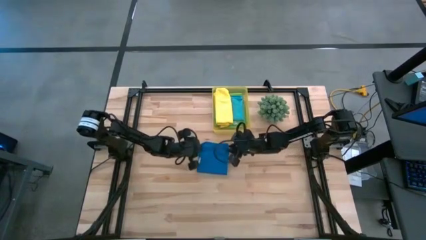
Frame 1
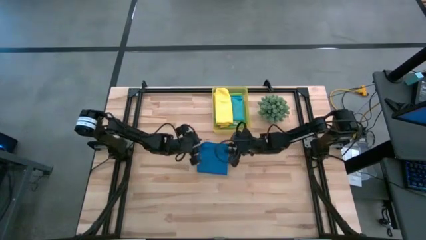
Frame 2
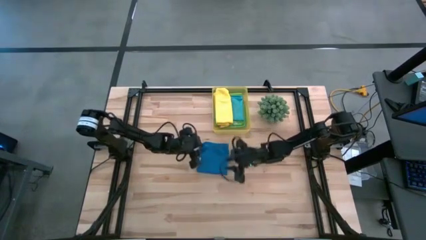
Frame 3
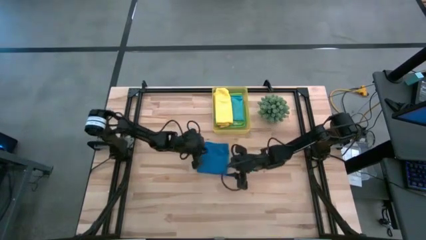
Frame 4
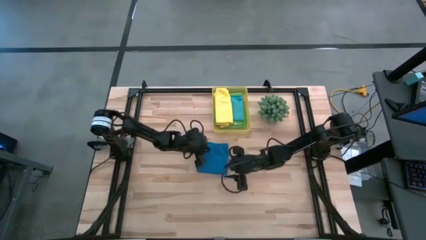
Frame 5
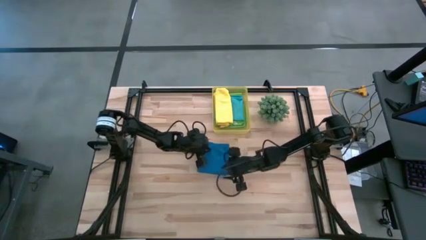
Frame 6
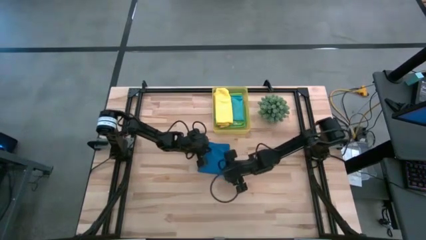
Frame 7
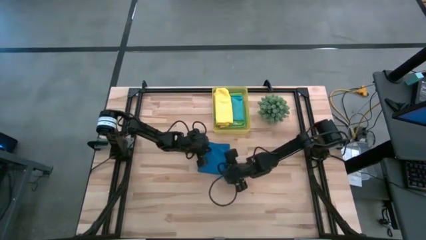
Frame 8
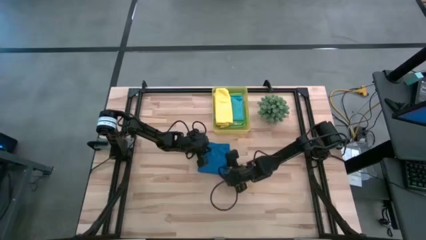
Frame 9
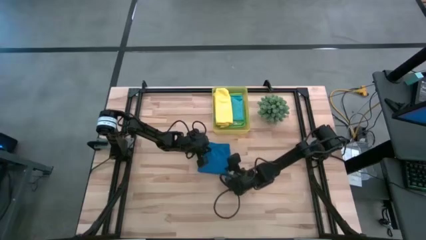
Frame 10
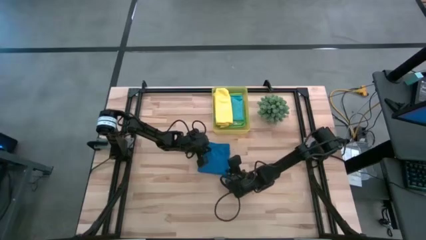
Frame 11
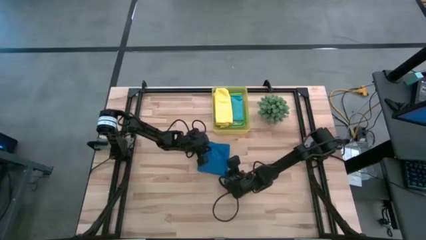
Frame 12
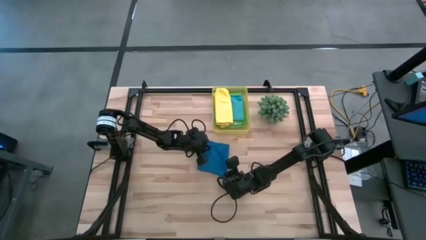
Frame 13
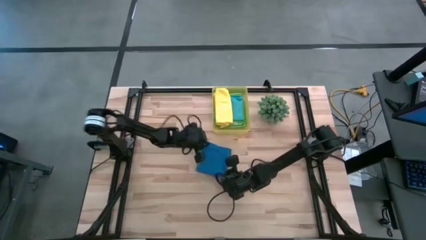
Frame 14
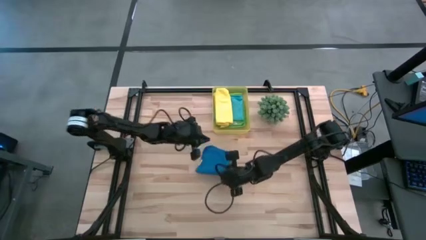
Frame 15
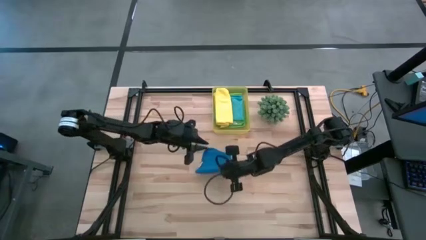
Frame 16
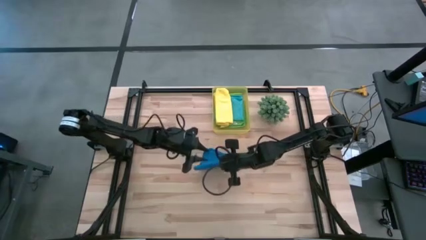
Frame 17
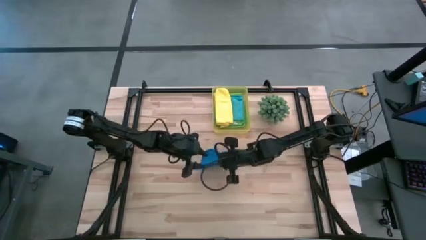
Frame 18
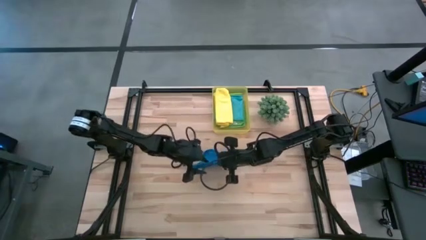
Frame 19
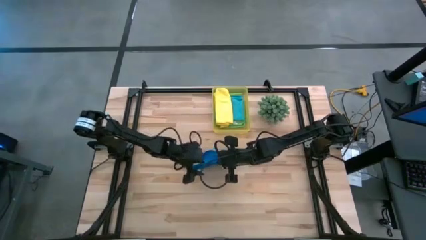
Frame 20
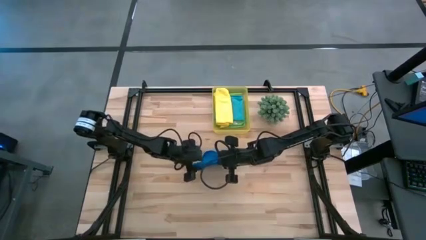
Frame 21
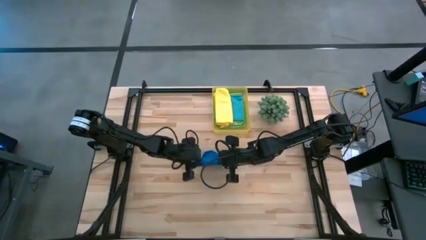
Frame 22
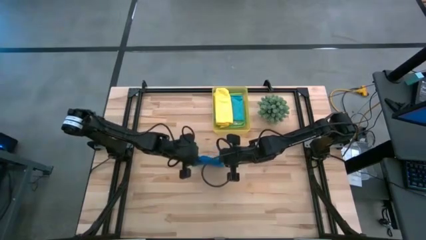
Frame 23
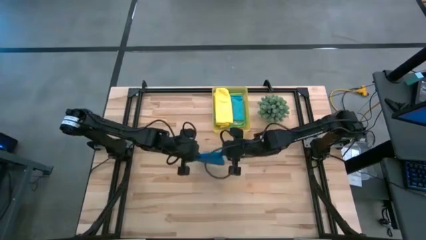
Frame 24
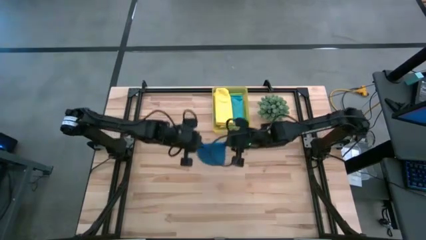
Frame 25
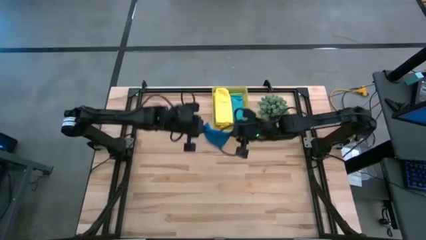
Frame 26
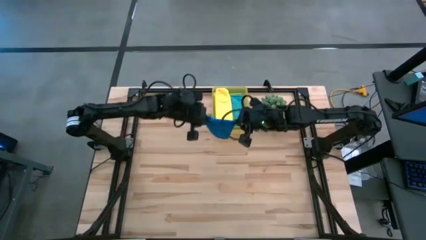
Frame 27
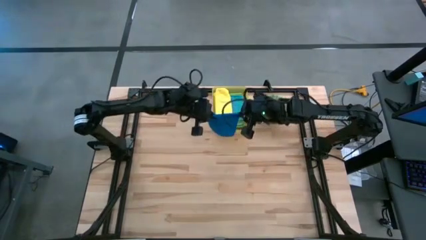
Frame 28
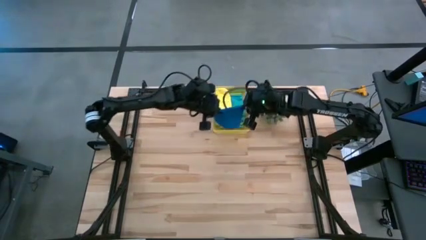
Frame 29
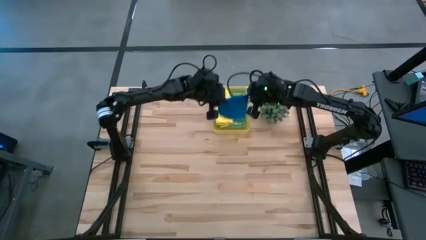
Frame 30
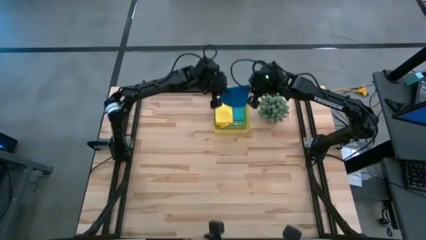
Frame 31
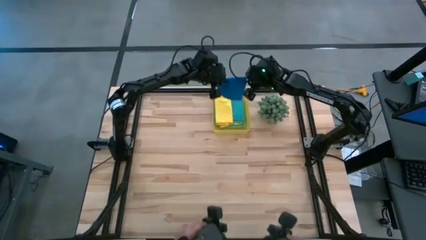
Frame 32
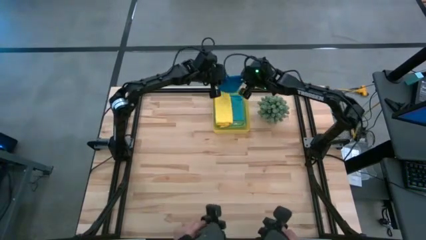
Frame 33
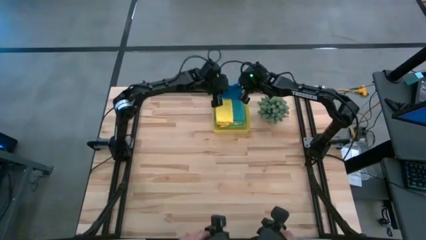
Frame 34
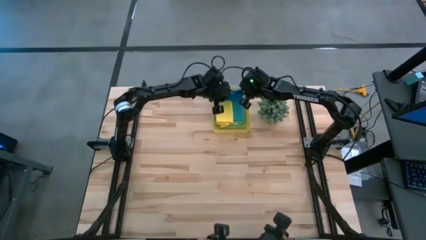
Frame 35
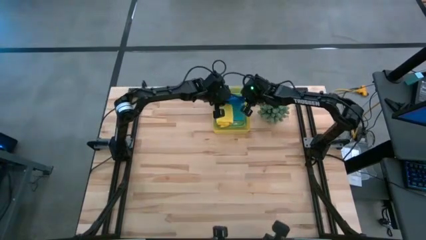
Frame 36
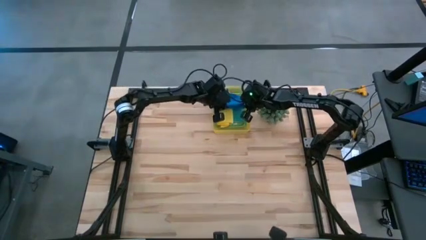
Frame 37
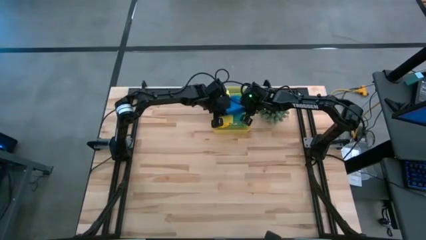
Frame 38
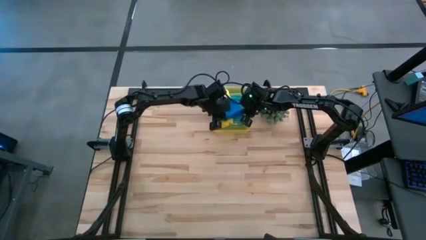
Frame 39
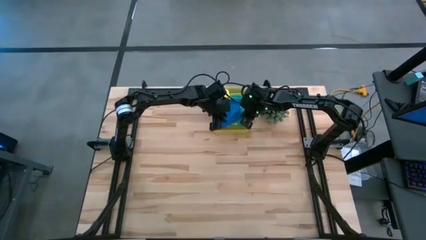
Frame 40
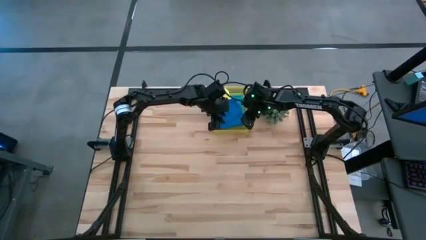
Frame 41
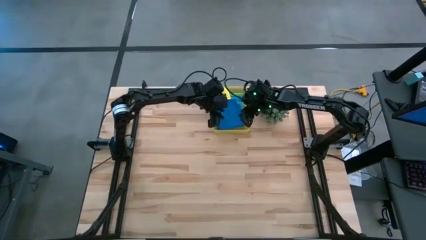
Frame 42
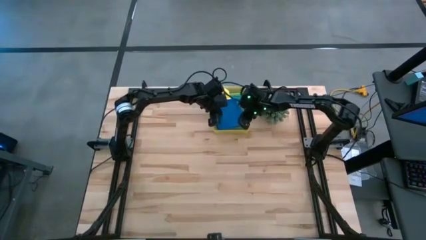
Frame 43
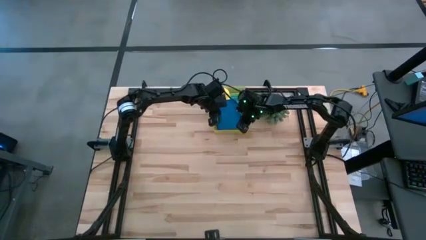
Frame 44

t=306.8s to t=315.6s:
Task: Fold microfiber towels
Put the blue microfiber cloth into the yellow bin

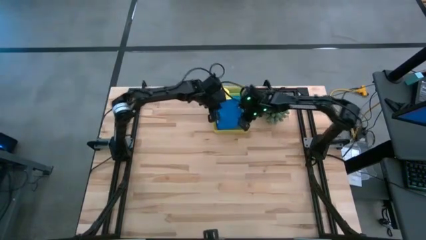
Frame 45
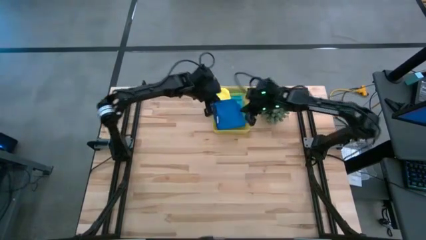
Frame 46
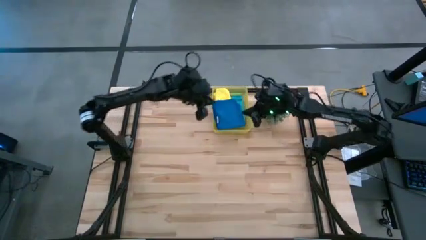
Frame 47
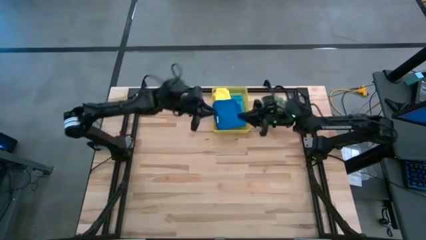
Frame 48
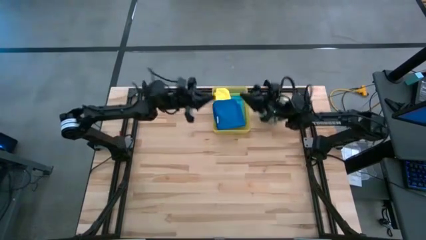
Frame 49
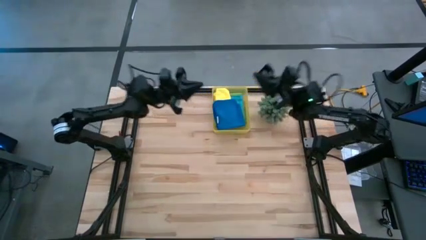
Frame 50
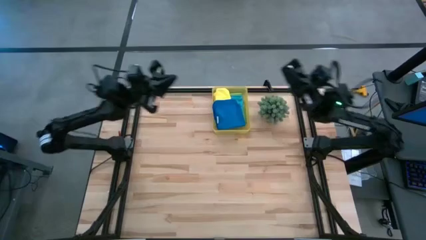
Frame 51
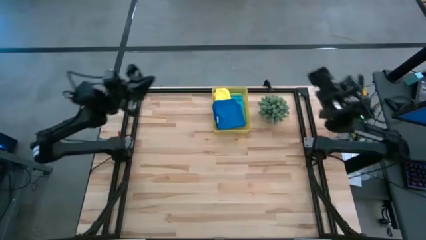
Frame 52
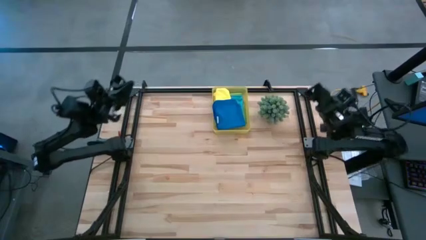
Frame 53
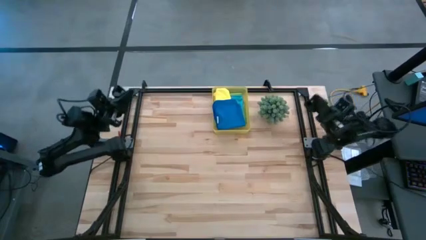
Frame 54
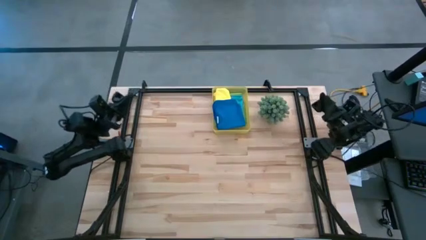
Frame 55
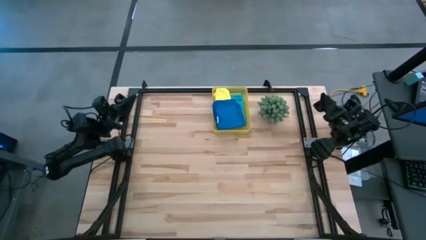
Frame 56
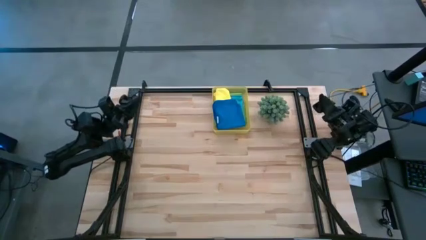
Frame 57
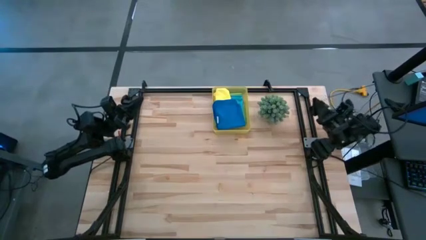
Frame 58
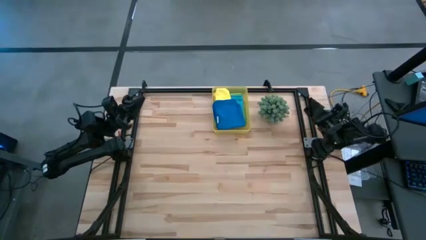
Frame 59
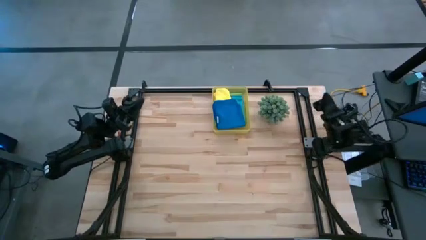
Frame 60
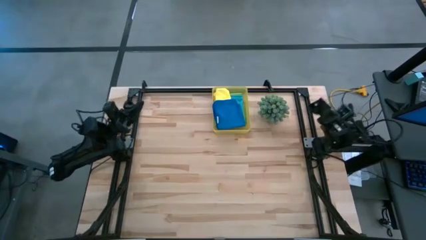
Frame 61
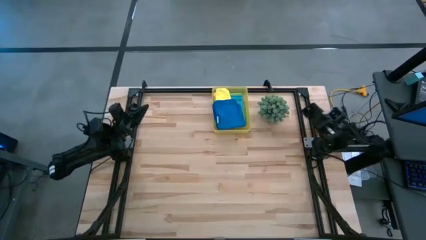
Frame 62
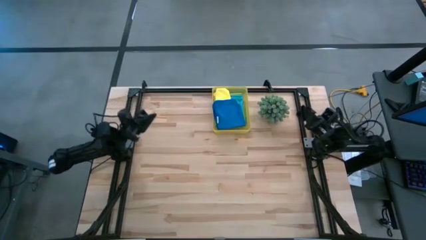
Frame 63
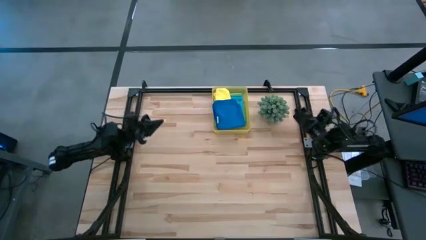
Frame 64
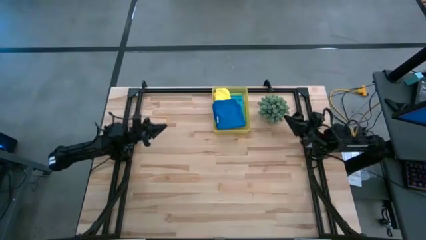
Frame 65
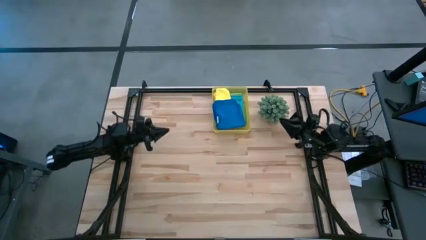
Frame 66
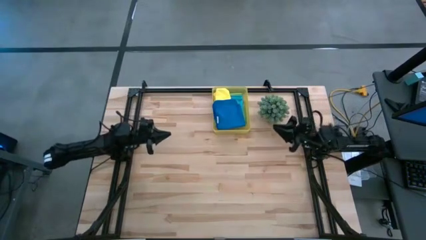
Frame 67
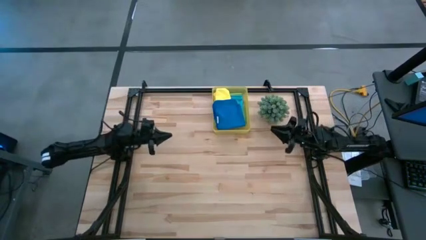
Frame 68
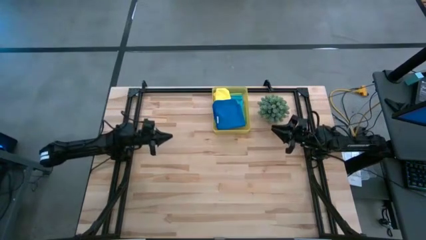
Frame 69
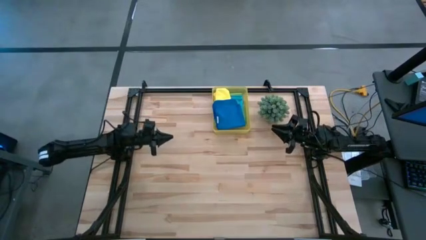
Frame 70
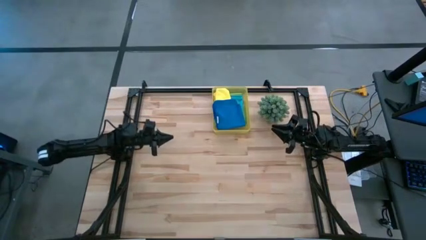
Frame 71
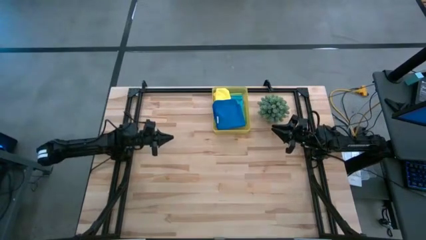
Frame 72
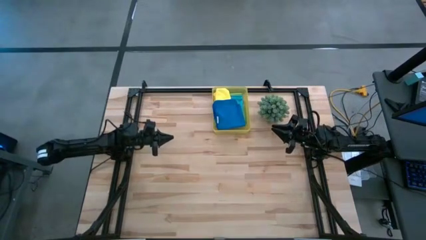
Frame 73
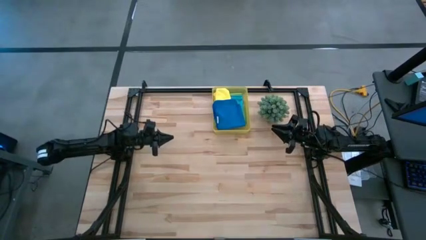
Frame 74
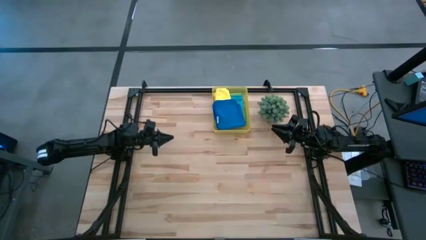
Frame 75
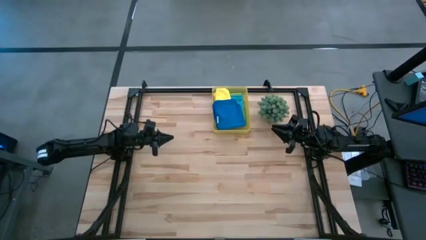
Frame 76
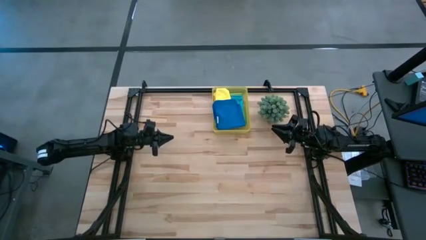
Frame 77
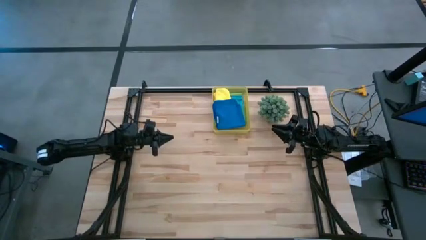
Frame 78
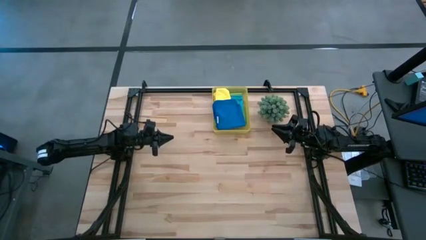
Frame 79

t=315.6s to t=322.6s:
Return to Home Position
